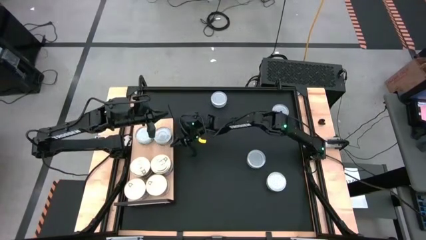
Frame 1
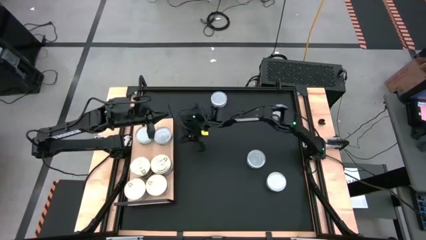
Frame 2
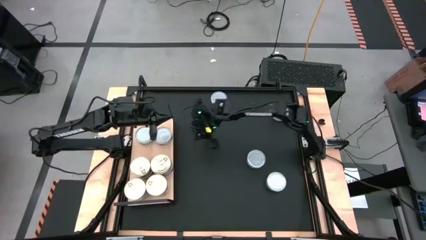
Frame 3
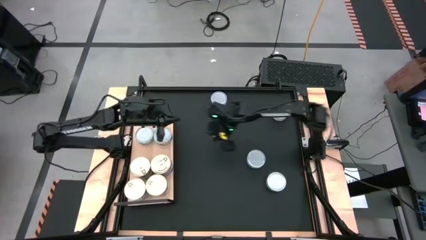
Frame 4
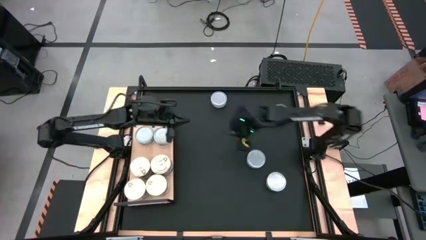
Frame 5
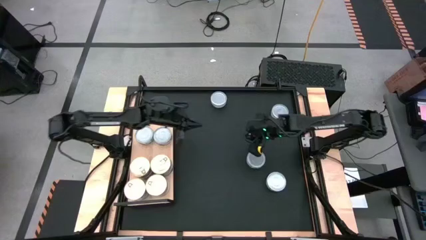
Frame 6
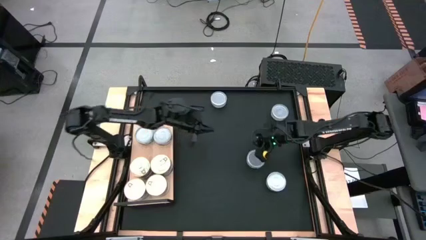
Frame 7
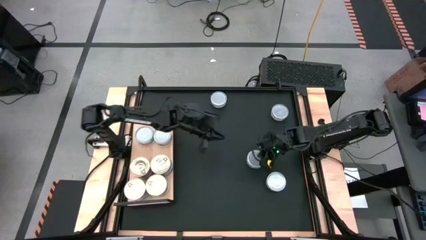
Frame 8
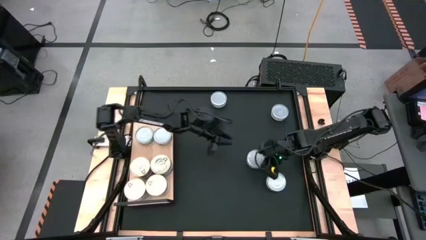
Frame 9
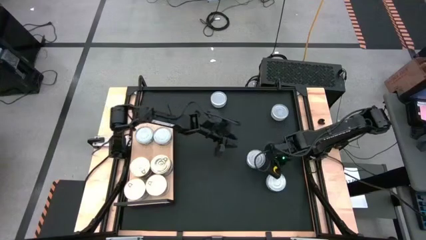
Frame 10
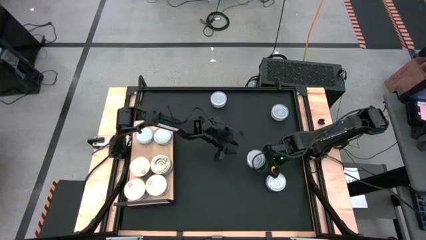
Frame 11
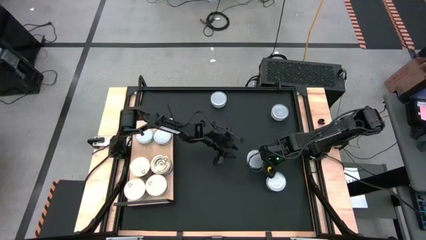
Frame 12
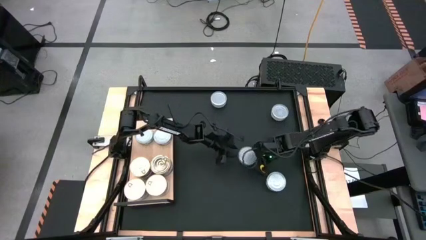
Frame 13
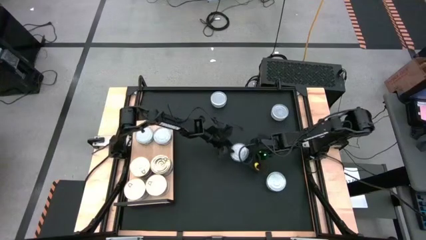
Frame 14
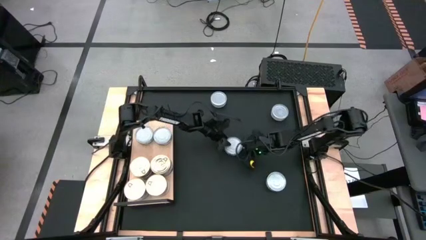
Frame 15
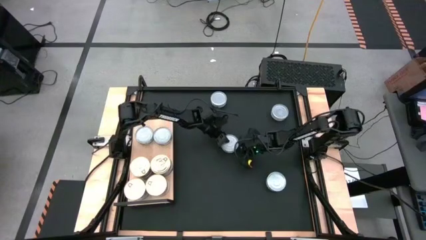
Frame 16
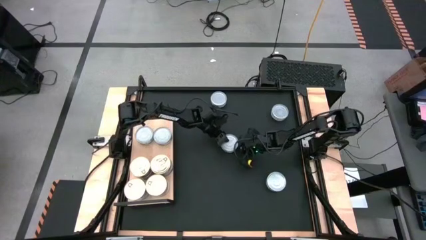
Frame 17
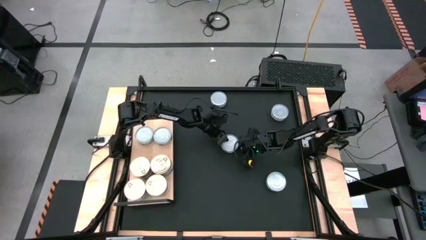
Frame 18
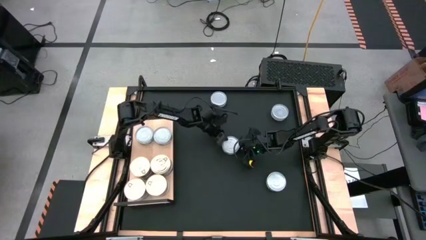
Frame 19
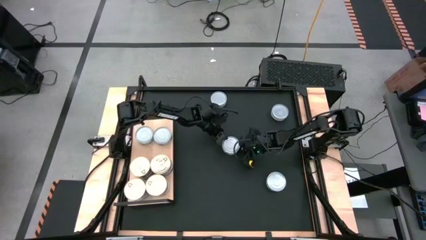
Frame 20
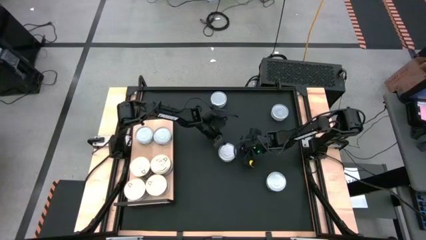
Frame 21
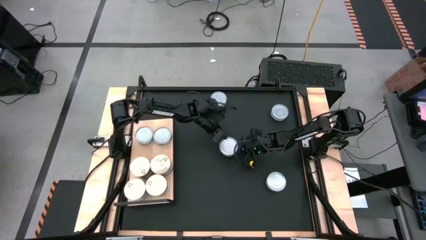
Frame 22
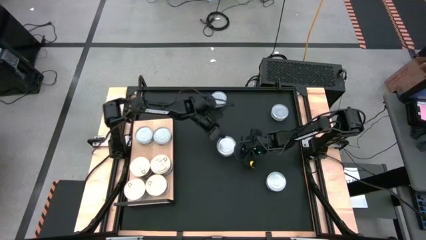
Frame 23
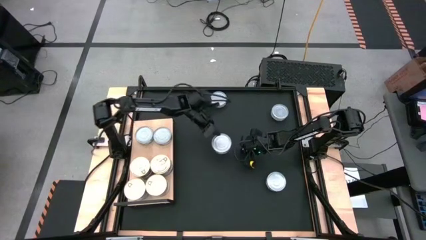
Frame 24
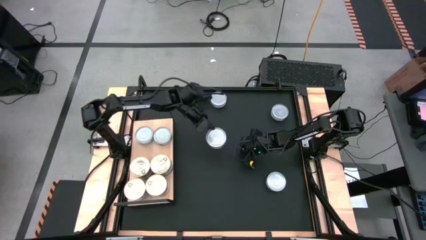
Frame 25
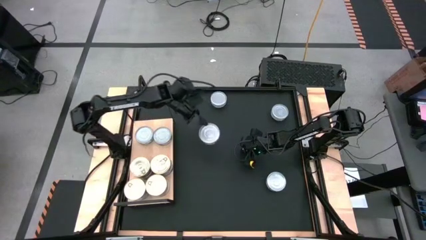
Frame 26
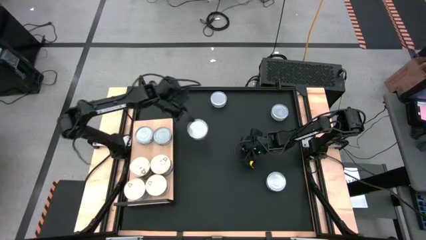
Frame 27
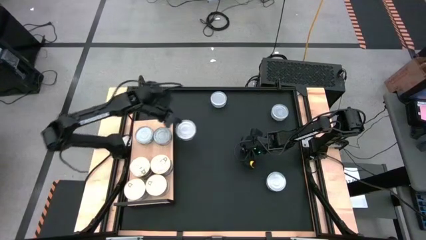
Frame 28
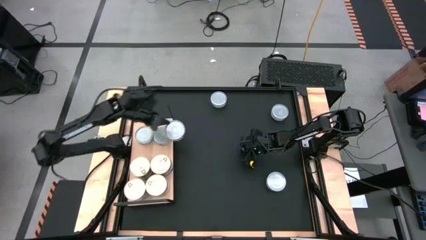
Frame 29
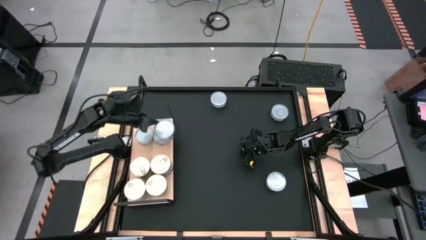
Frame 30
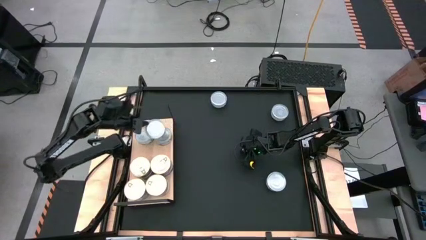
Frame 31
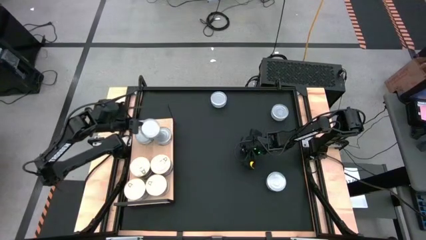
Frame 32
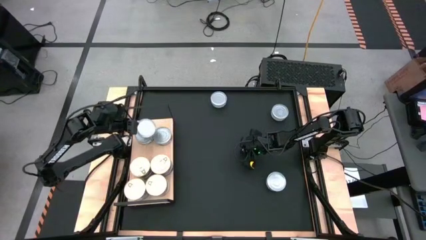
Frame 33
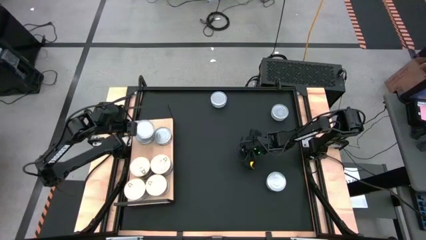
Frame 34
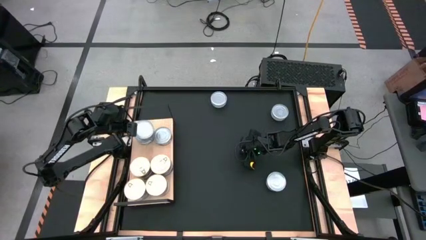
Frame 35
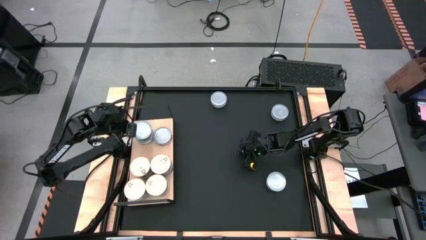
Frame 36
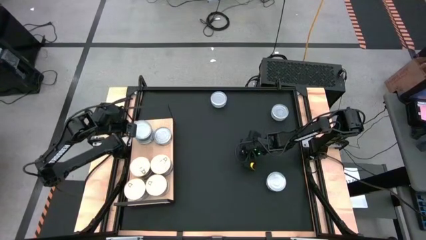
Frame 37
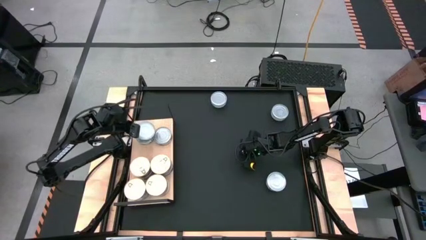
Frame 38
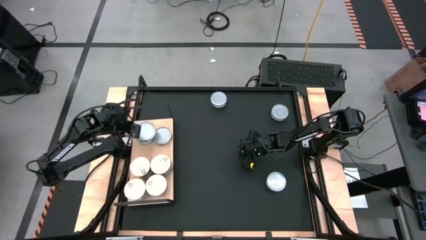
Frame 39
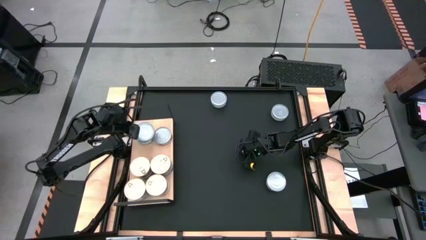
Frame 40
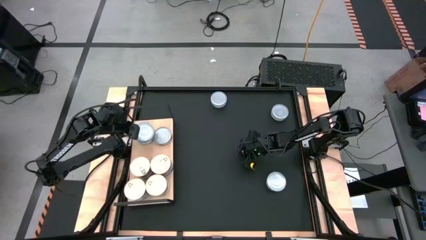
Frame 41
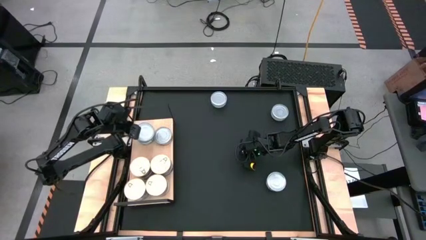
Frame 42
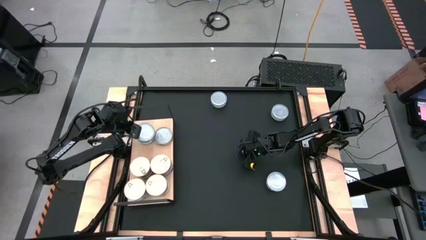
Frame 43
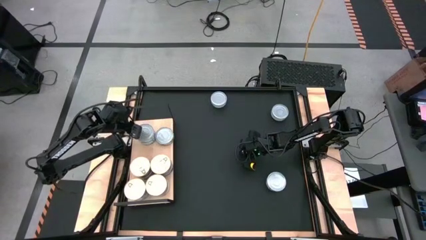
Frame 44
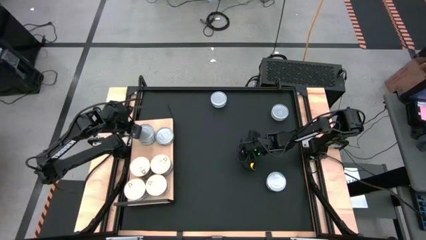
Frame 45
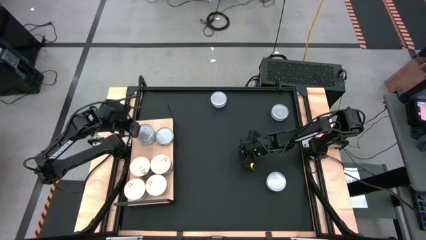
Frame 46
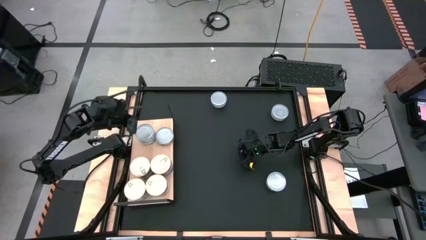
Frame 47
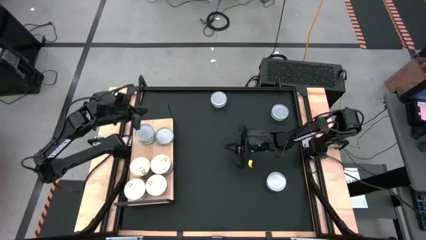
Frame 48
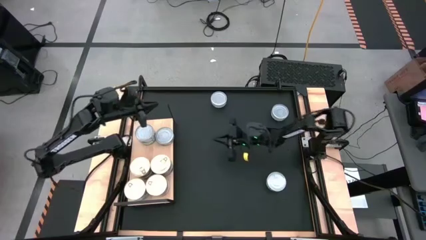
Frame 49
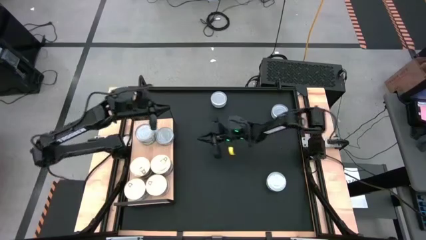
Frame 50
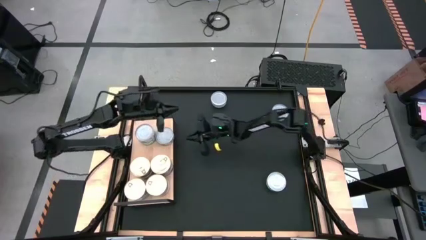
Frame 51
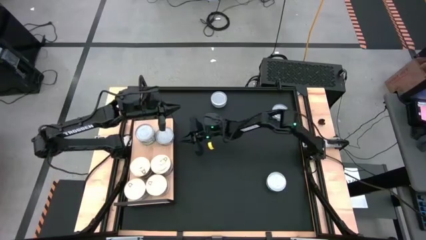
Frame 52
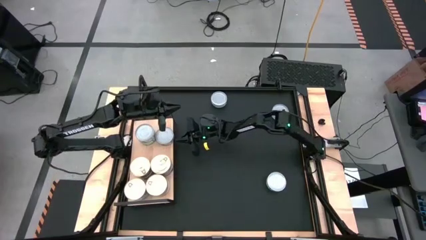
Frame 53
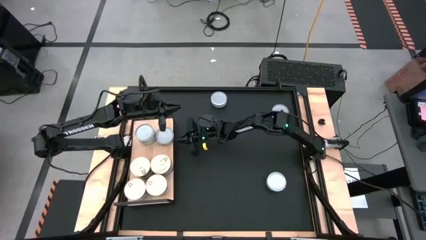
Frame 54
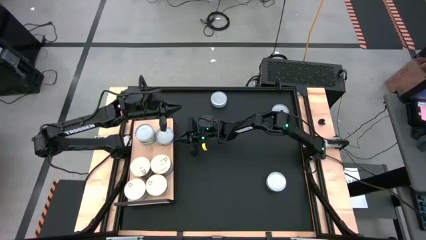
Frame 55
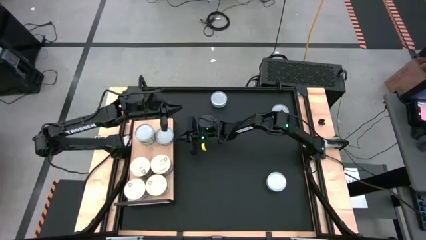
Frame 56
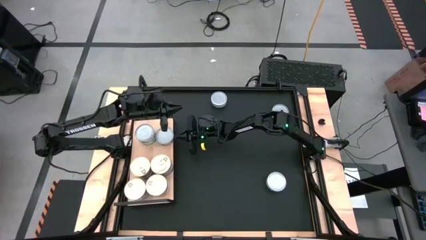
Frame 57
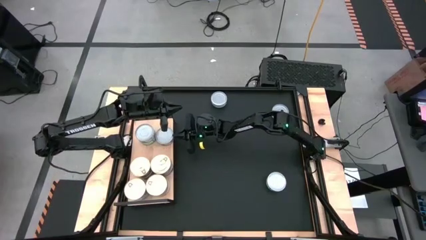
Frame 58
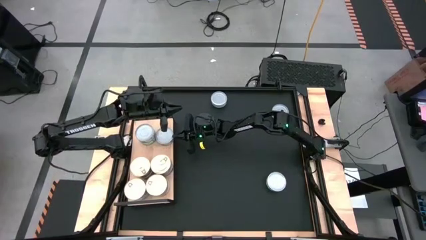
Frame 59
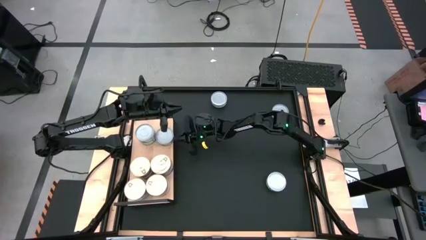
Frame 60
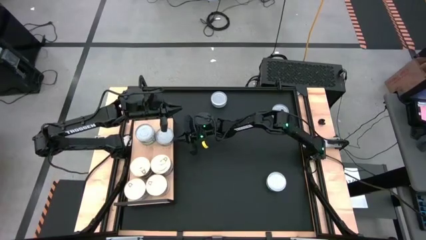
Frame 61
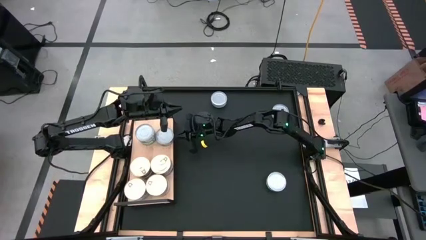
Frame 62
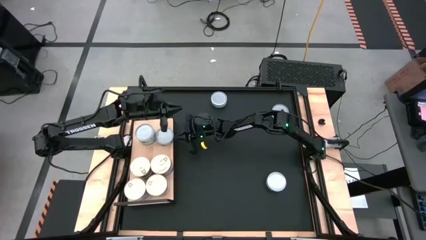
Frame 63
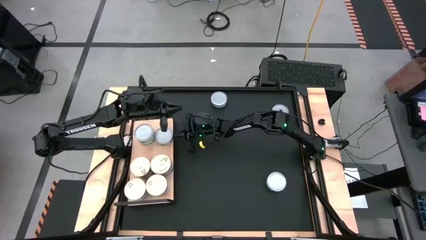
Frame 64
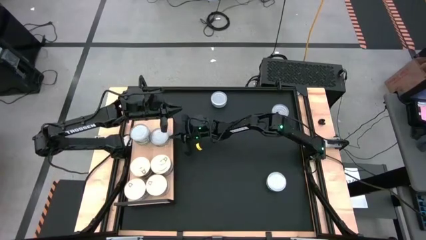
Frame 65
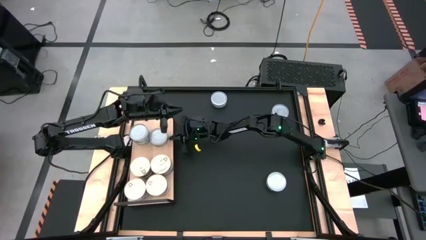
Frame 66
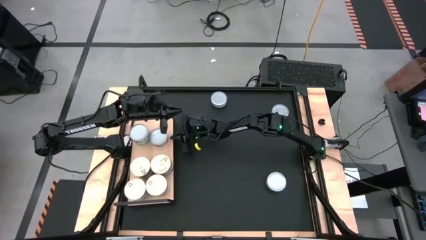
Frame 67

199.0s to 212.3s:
Task: Stack canned seafood by type on shelf
Stack the green tuna can on top of the green tuna can on the shelf

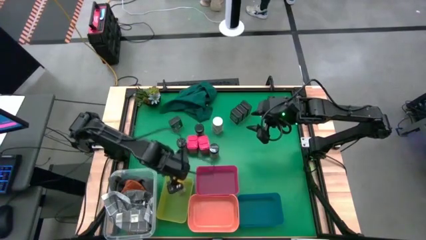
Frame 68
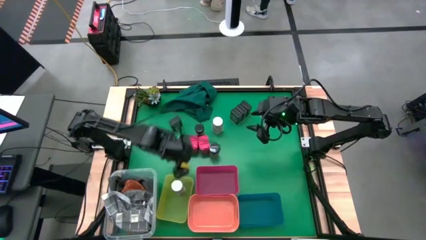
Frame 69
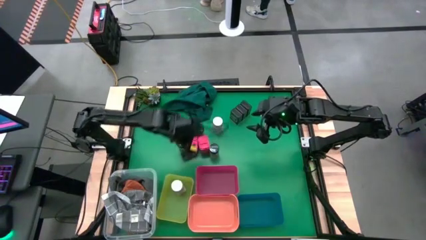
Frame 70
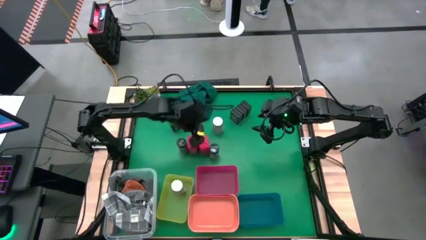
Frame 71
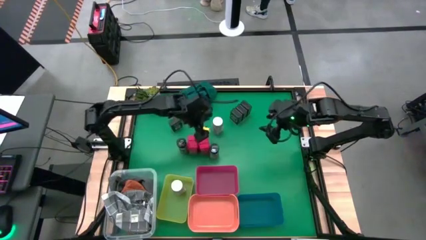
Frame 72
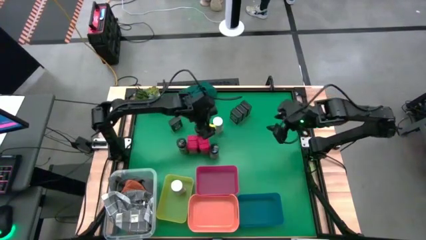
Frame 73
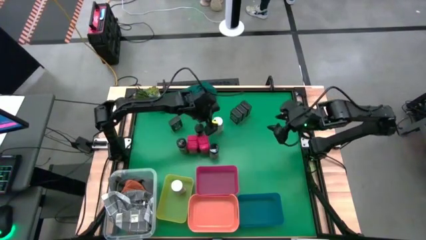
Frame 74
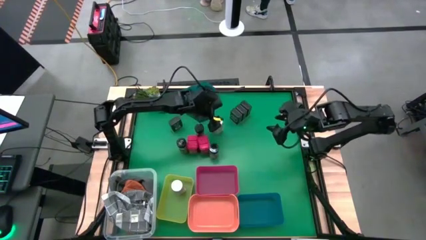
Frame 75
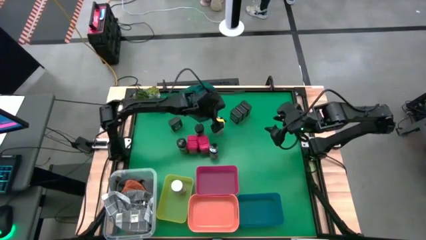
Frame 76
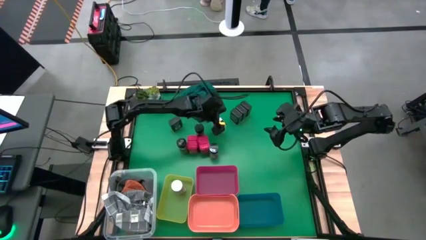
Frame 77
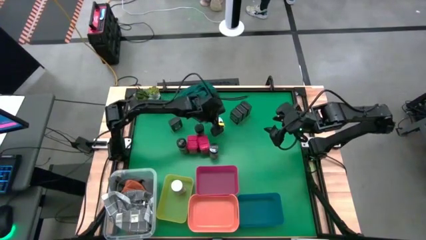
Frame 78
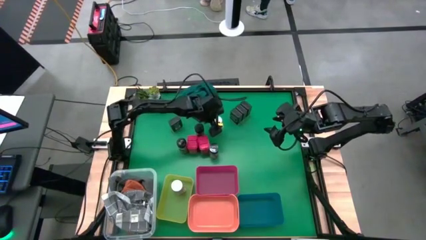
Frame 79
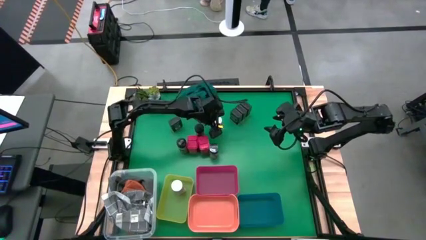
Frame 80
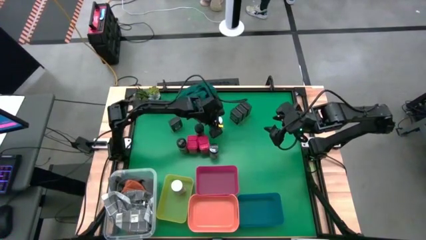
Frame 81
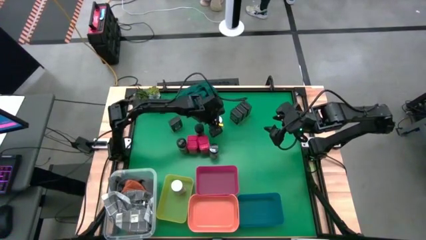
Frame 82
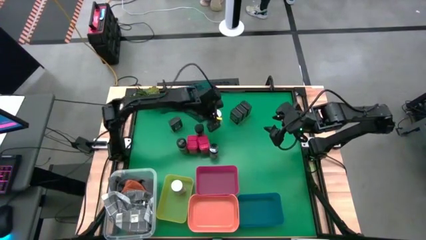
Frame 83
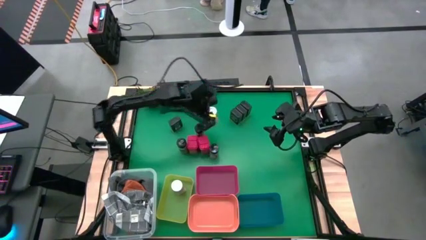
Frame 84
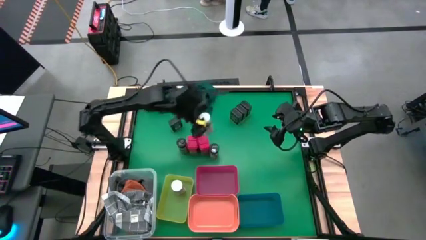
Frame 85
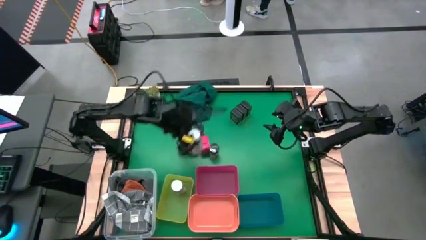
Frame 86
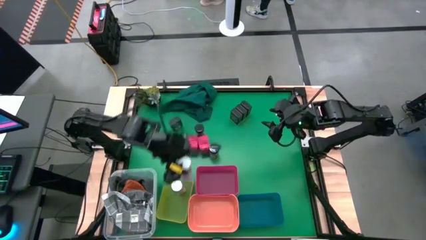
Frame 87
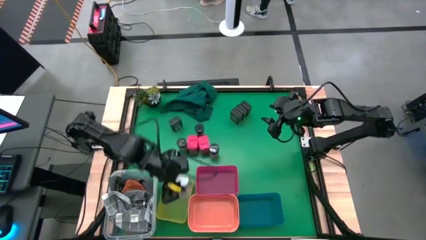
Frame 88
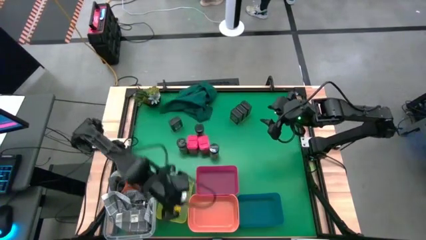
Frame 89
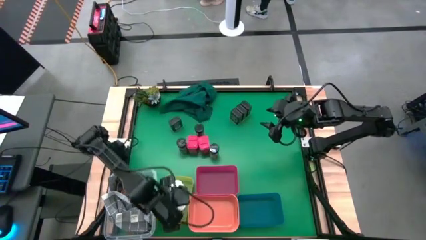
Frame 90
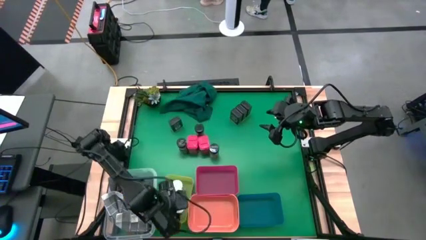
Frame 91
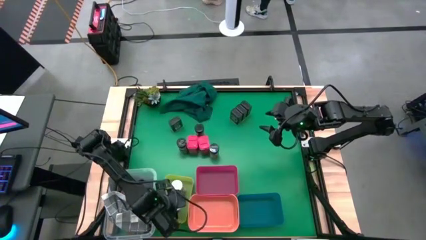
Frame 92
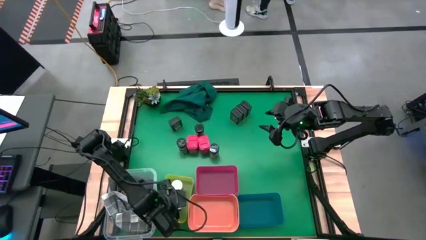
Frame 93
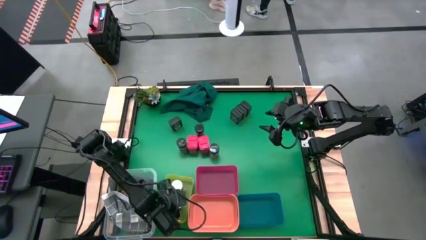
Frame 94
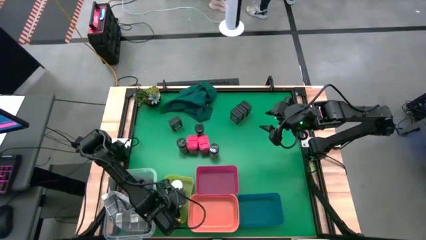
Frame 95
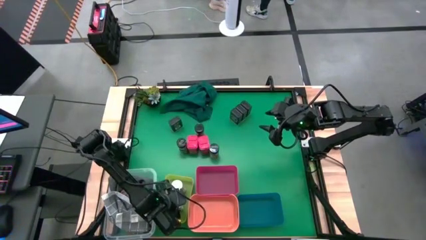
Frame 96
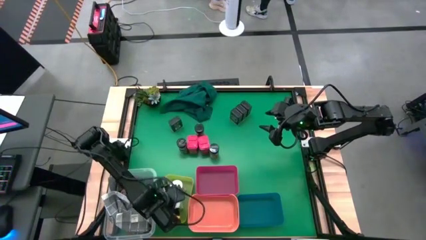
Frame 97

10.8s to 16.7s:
Task: Sort spices by type
Put the white seasoning bottle into the yellow bin
